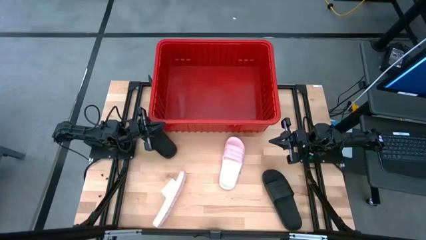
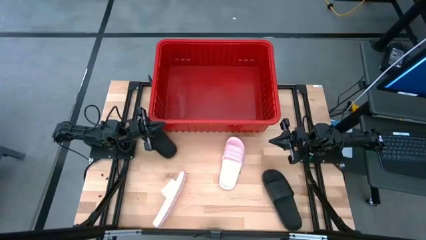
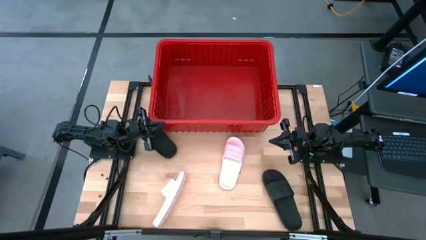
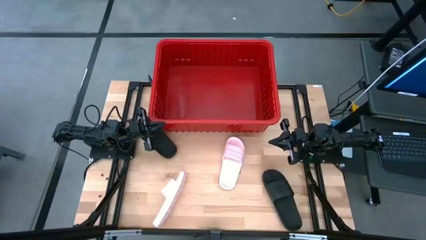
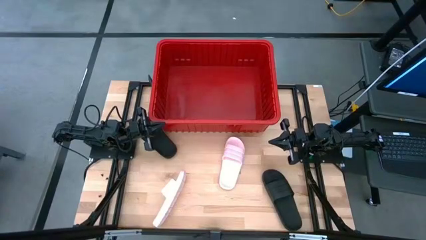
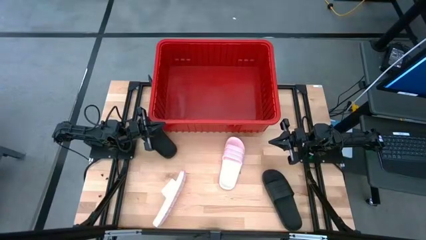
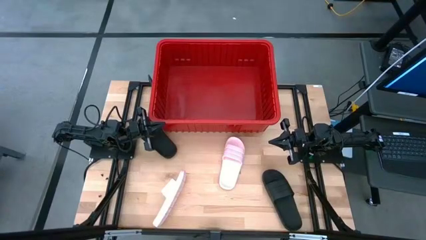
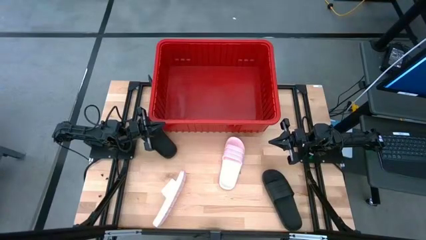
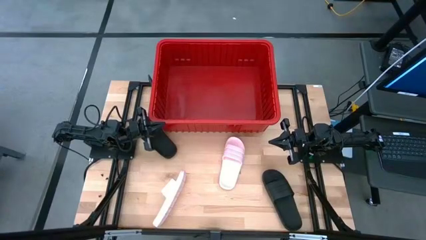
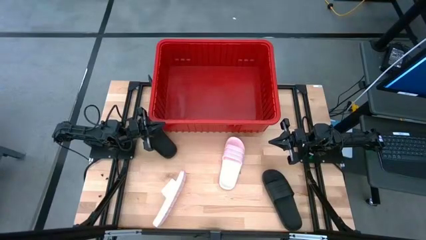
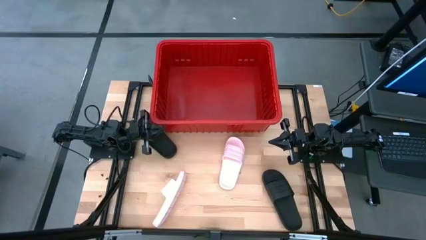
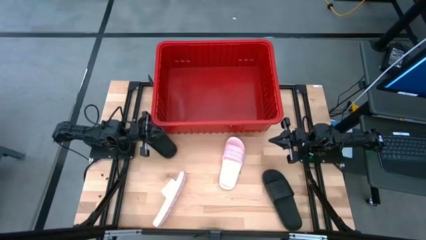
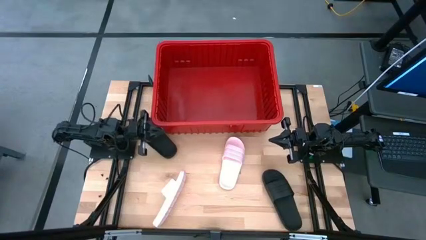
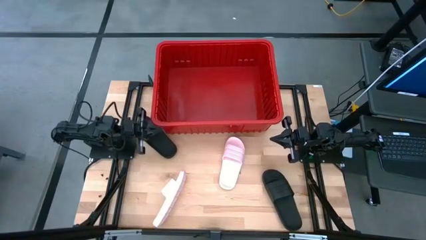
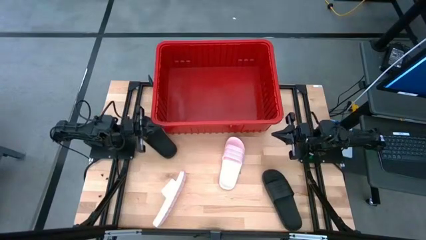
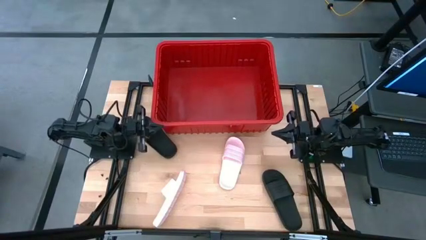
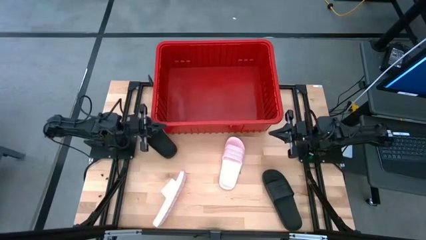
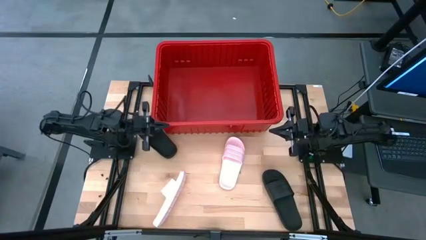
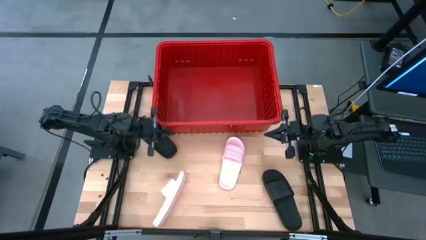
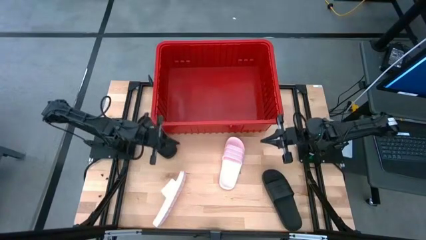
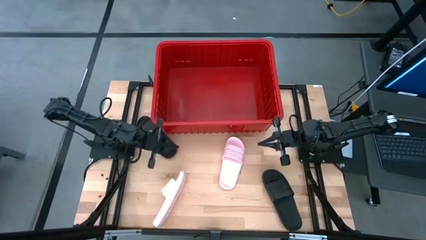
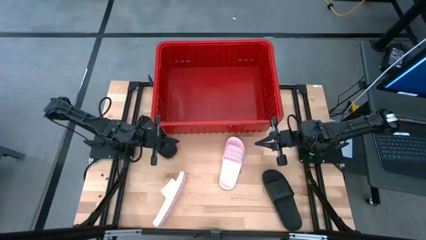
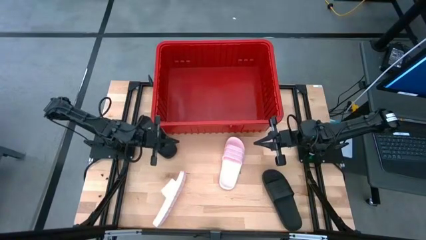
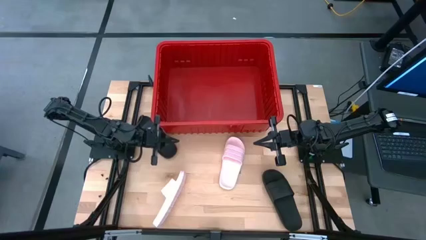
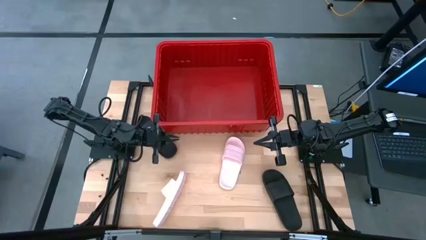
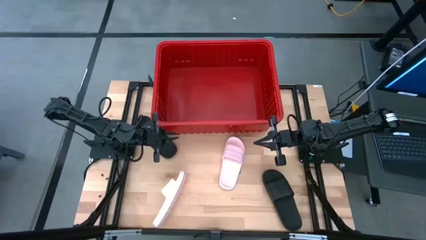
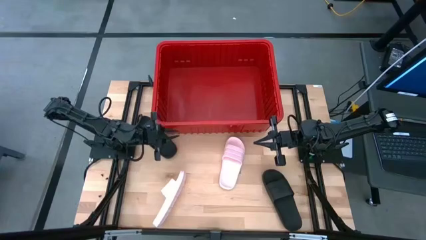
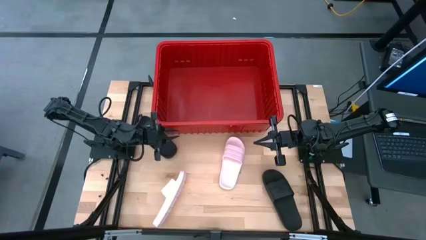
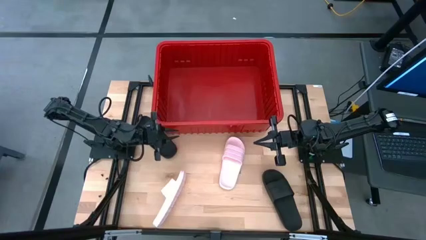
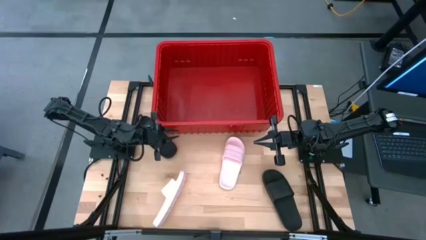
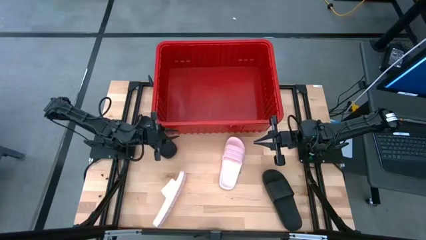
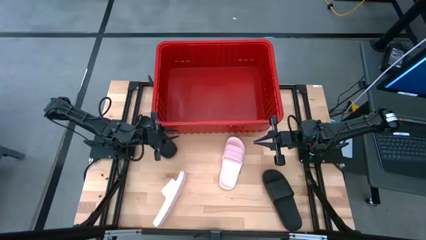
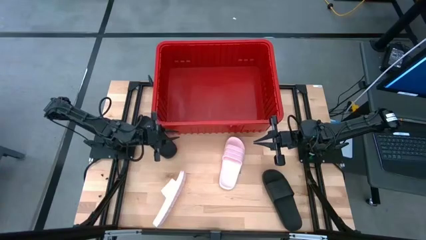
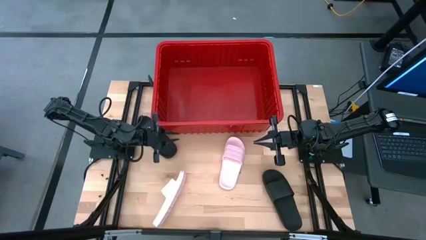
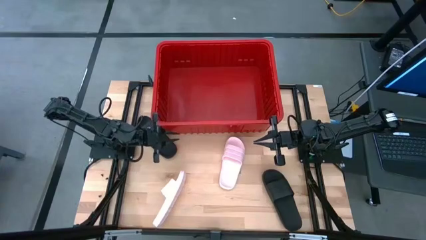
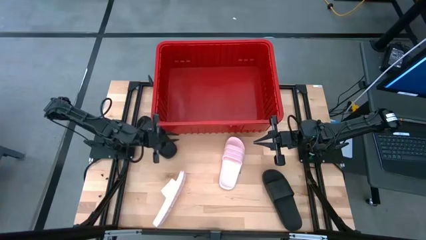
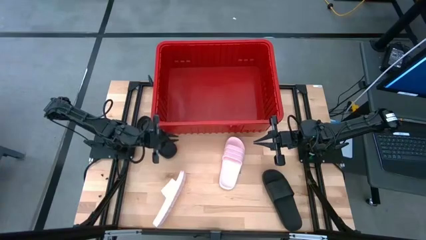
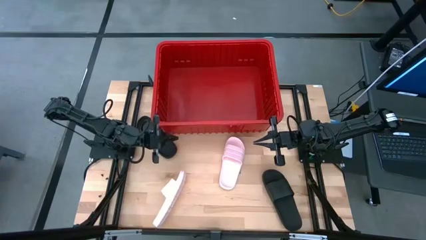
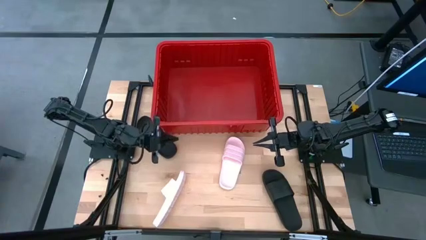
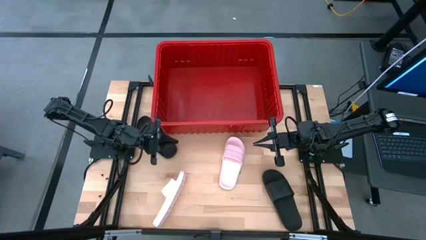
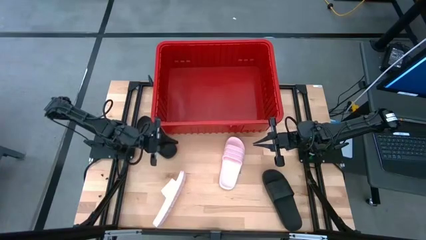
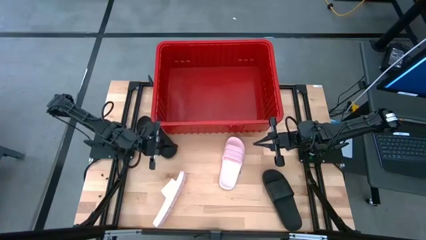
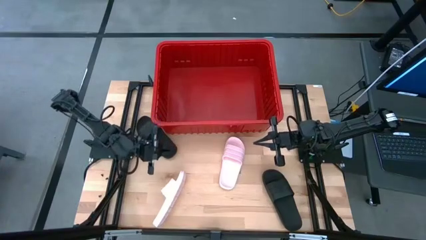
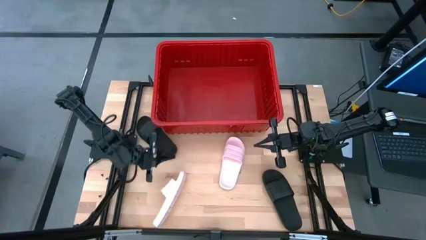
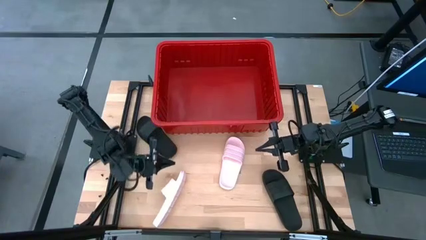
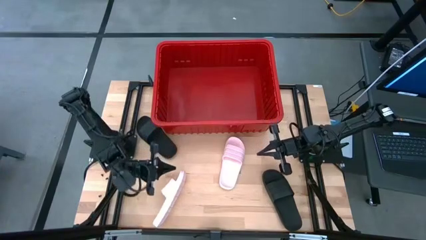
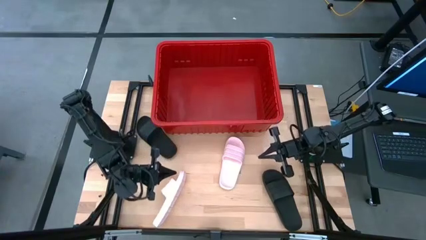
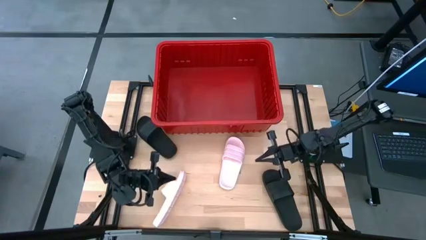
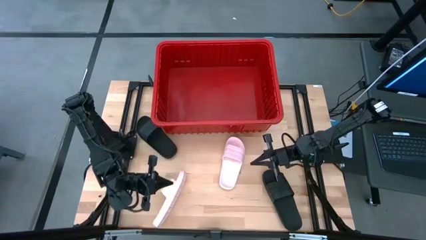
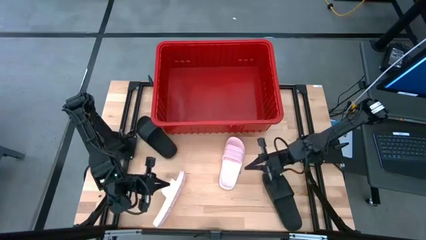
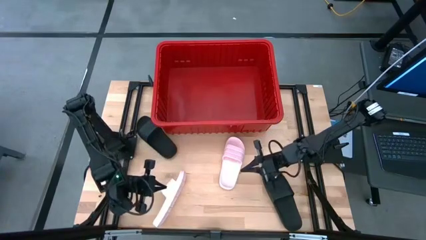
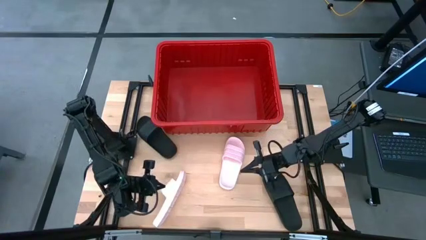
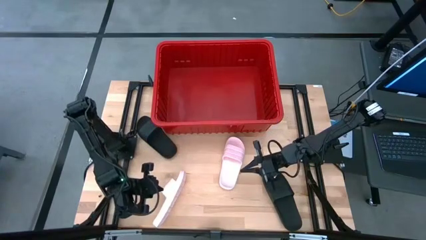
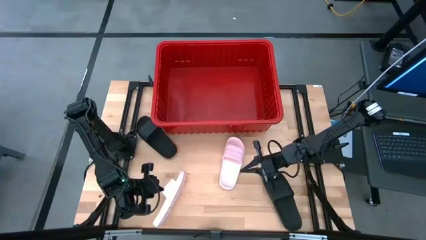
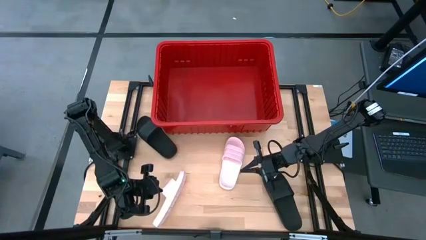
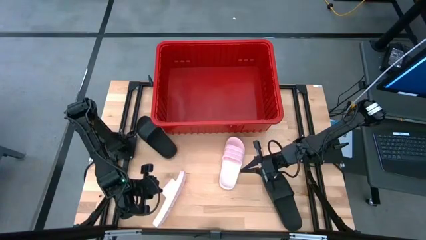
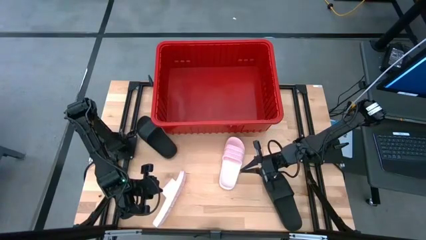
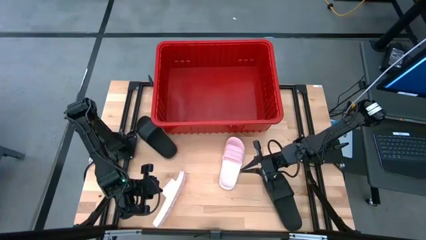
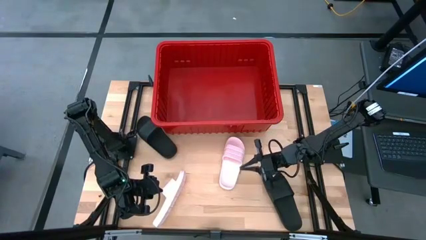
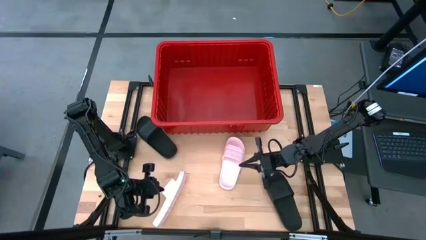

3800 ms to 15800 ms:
Task: Pick and place slides into bin
Put the top pink slide into the red bin
